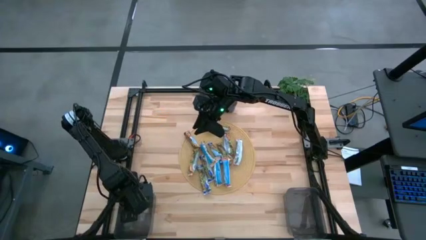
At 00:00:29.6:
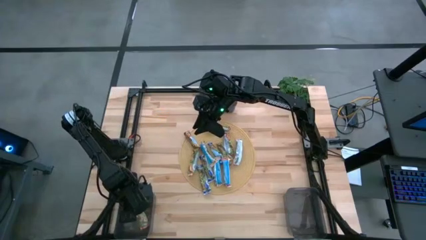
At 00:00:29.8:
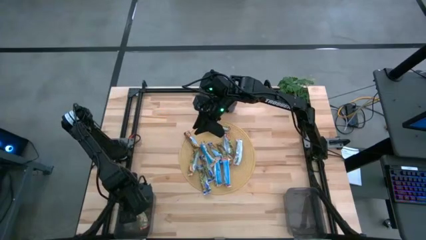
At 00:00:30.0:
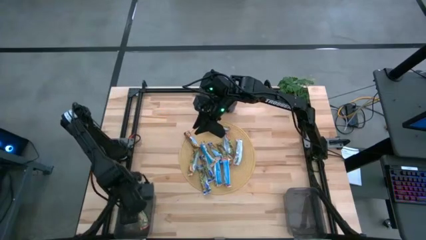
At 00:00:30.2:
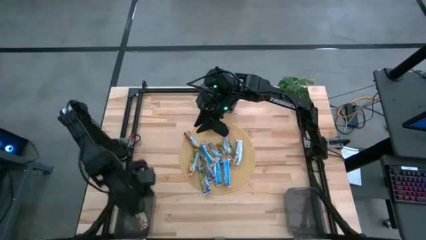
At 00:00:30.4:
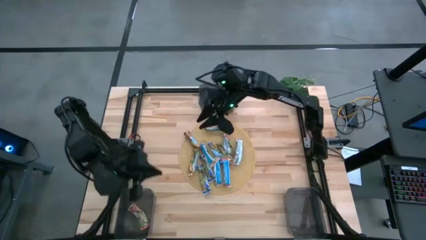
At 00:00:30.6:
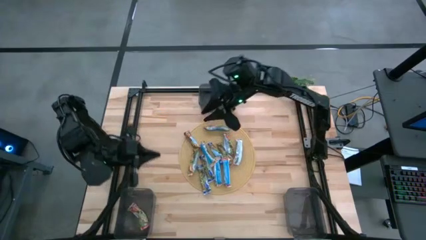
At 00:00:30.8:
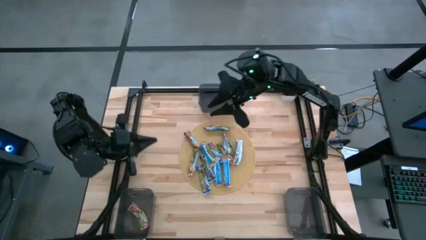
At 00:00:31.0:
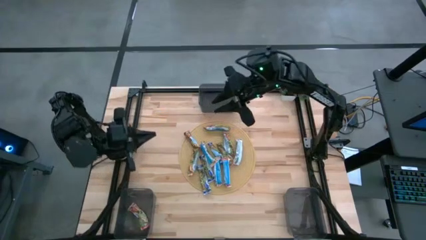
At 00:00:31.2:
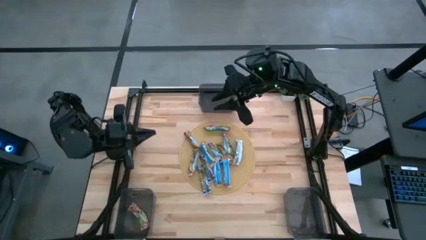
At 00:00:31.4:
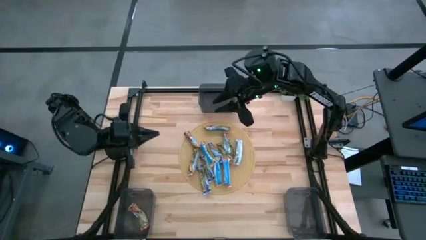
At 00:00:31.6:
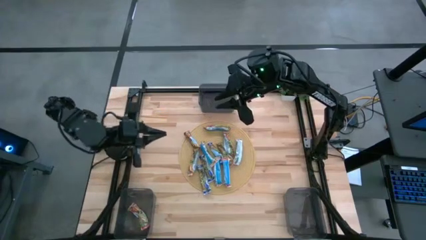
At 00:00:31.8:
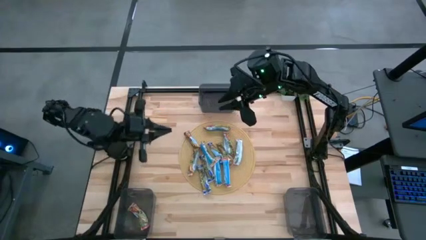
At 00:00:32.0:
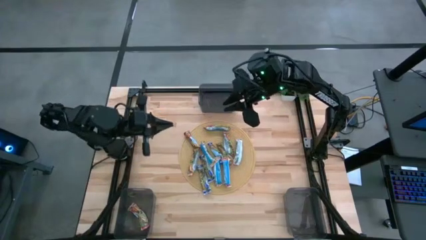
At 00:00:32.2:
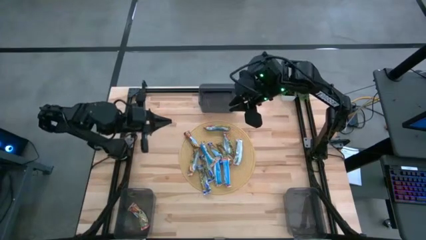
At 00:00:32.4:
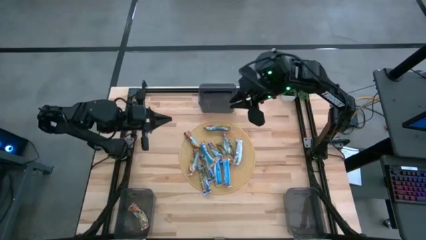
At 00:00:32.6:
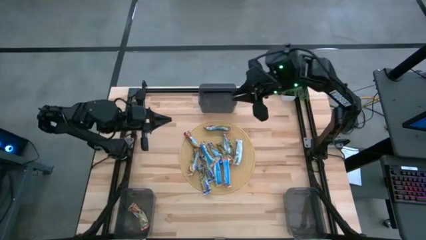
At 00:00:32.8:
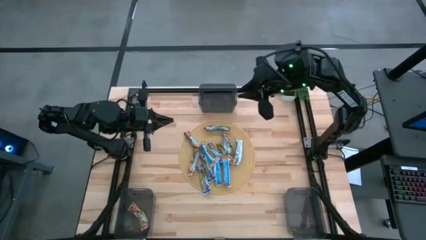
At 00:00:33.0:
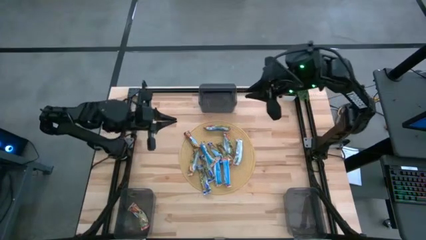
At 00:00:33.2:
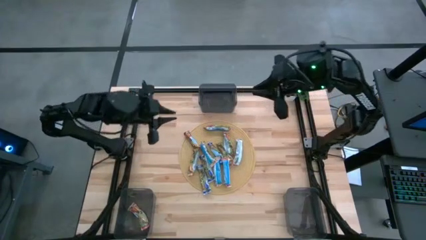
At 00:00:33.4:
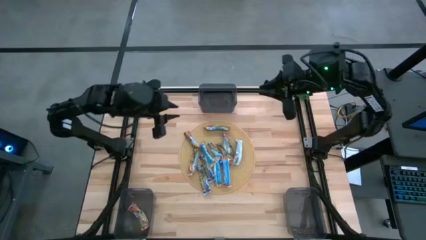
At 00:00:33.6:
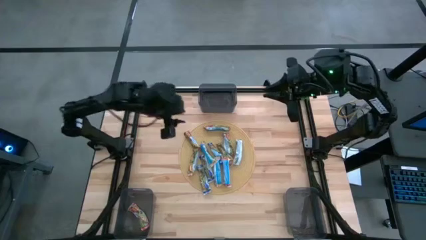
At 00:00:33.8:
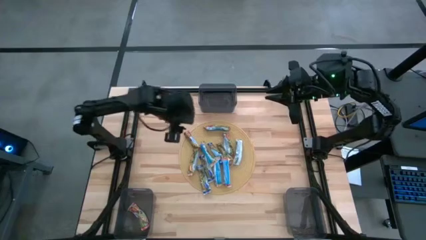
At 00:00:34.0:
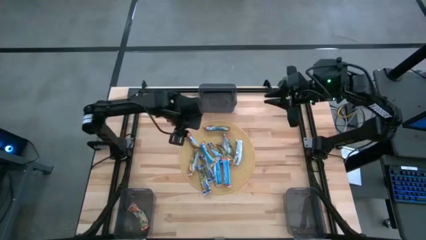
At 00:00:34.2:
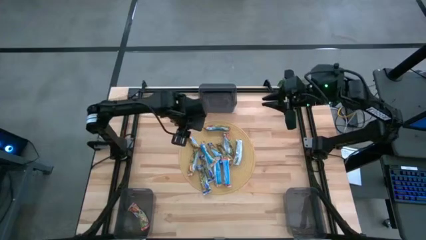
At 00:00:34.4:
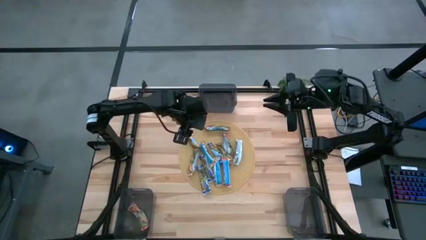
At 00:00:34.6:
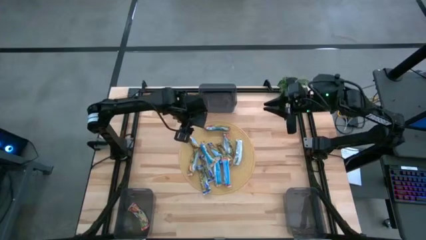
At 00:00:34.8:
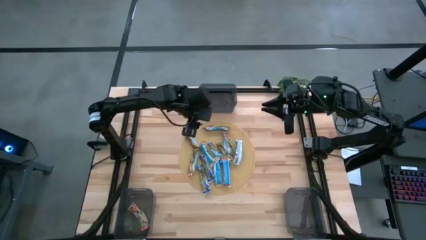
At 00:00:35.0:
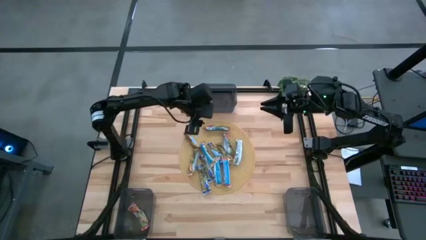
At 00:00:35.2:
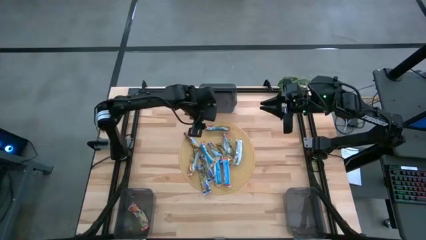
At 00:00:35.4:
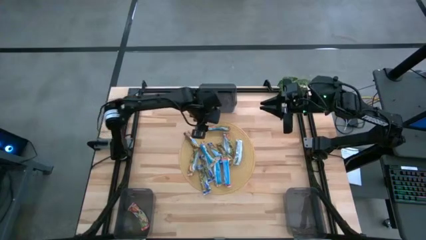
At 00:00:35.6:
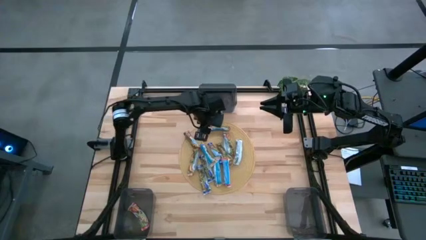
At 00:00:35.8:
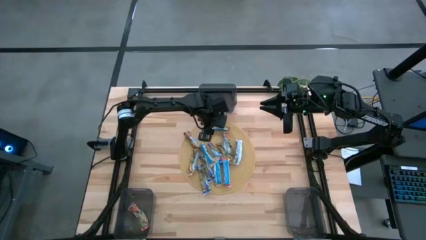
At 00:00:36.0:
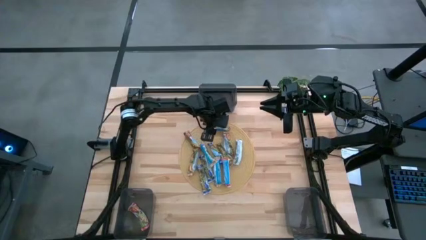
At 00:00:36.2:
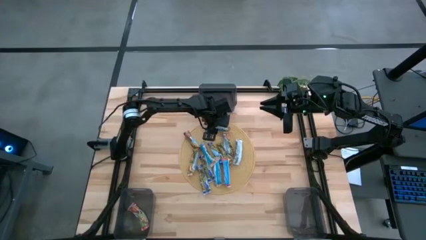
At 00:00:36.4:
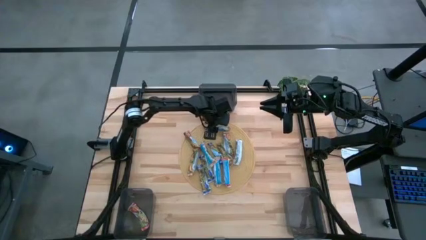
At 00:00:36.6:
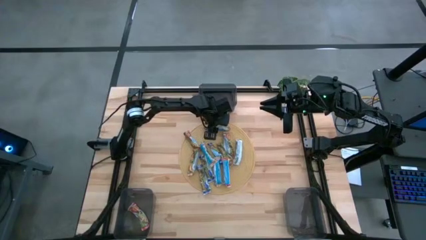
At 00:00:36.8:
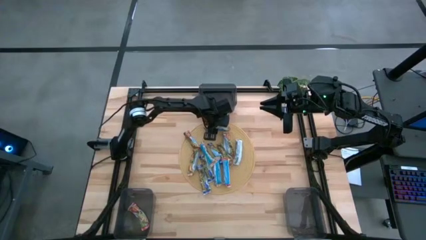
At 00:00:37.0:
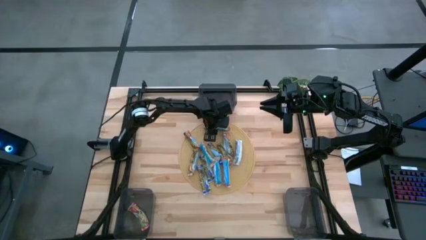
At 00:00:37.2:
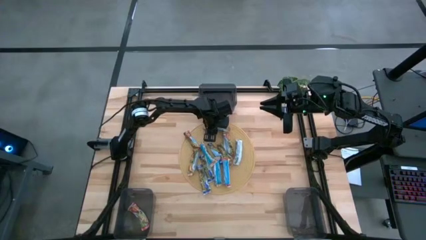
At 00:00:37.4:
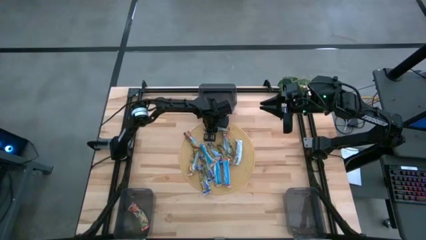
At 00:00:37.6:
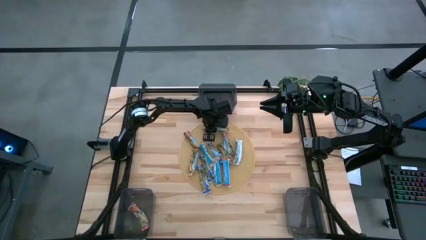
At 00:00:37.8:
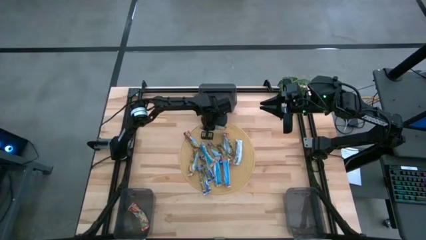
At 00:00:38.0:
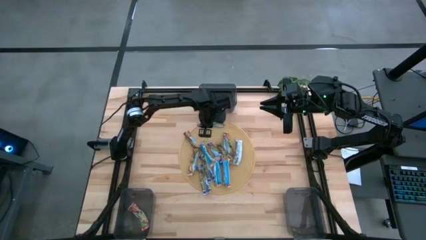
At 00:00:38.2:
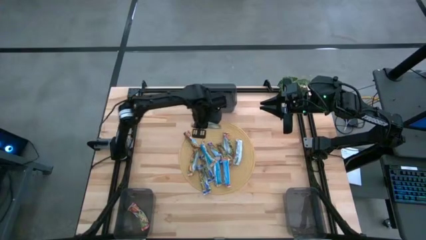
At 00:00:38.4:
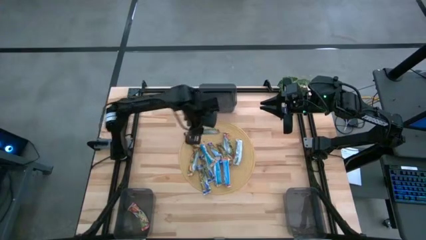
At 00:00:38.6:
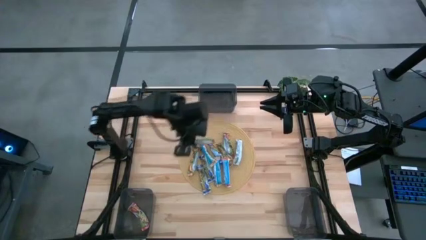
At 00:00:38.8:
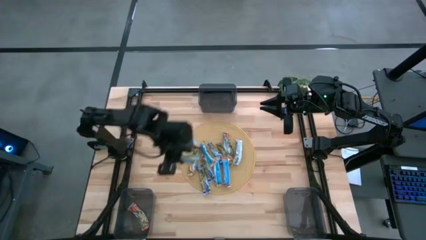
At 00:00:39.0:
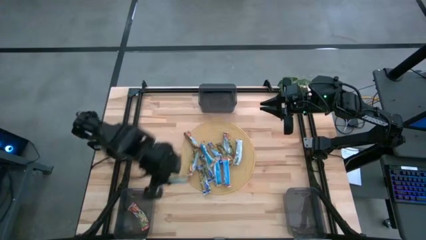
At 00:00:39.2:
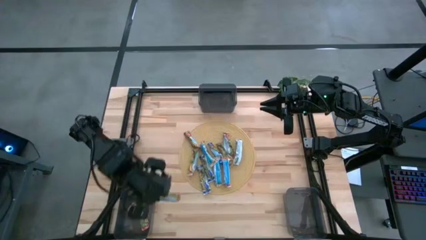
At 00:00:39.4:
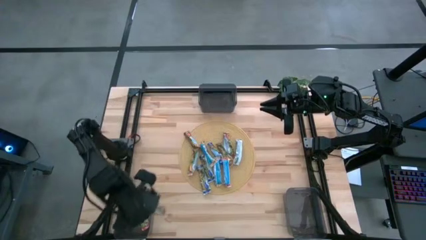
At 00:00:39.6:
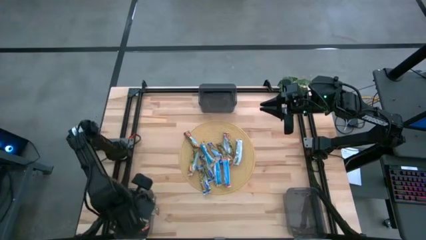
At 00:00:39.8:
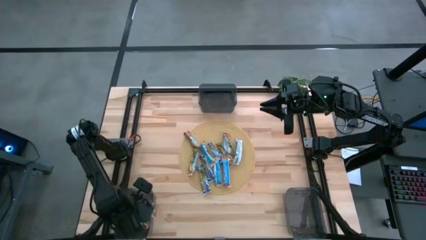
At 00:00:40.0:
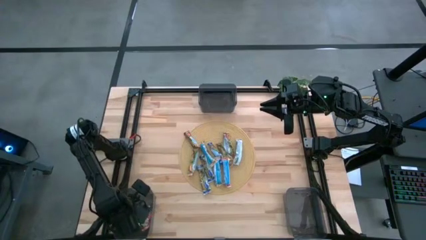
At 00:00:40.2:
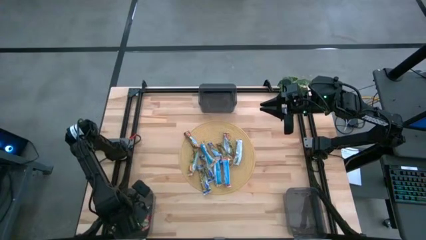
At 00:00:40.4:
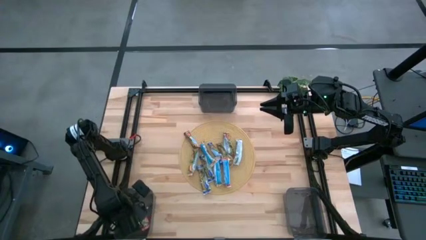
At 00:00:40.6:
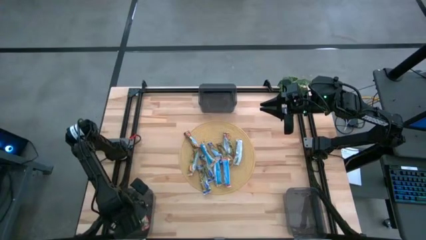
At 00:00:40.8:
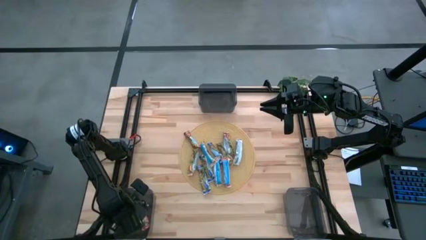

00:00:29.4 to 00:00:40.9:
Task: Pick and place Granola Bars by type
Put the red granola bar into the left black bin

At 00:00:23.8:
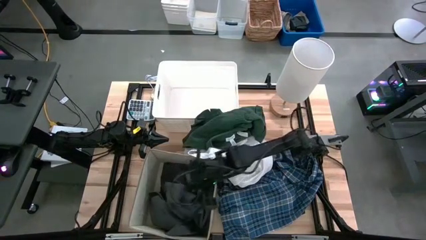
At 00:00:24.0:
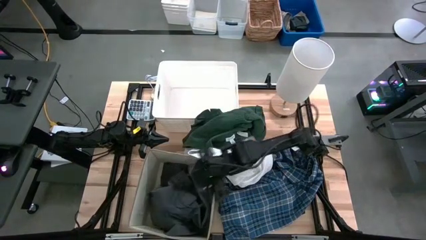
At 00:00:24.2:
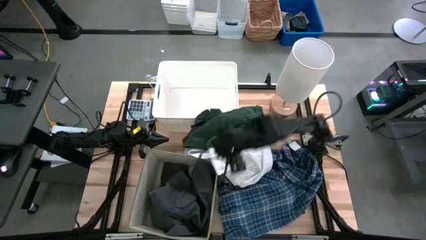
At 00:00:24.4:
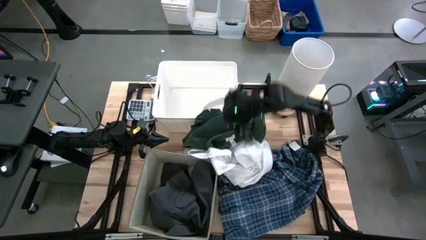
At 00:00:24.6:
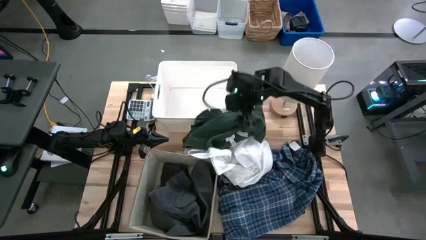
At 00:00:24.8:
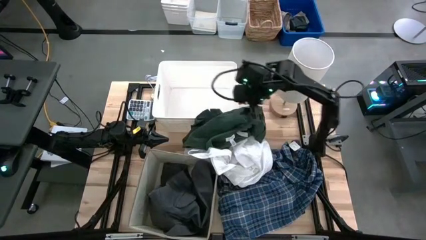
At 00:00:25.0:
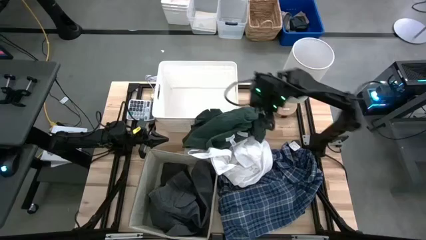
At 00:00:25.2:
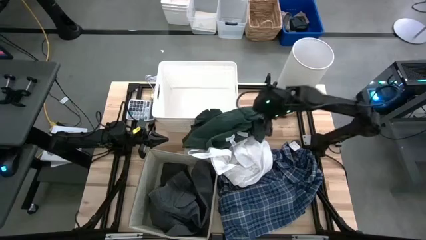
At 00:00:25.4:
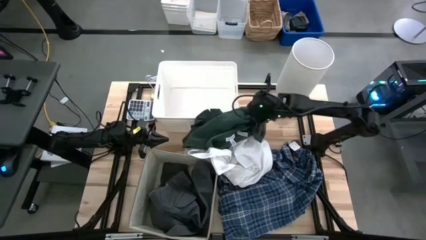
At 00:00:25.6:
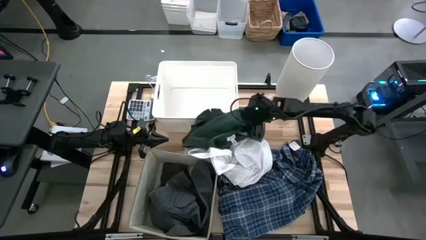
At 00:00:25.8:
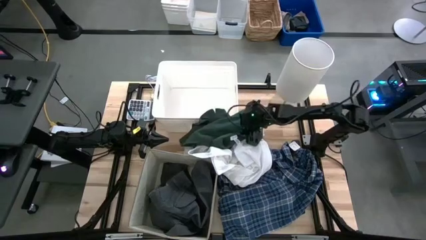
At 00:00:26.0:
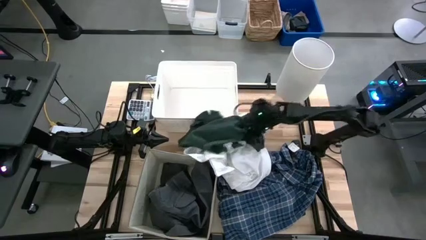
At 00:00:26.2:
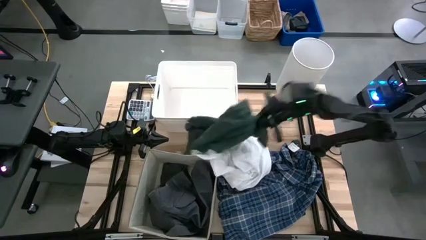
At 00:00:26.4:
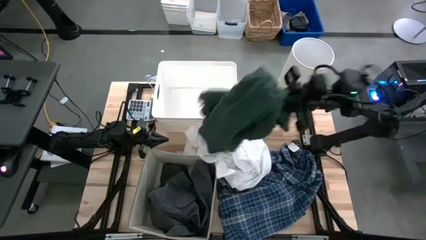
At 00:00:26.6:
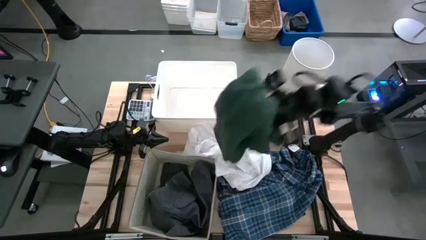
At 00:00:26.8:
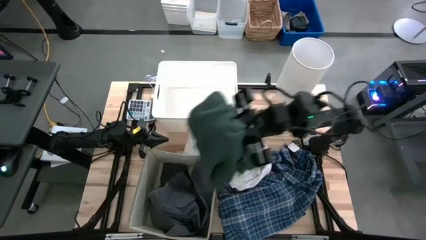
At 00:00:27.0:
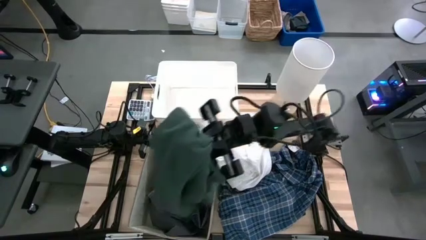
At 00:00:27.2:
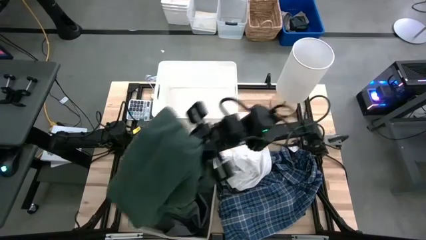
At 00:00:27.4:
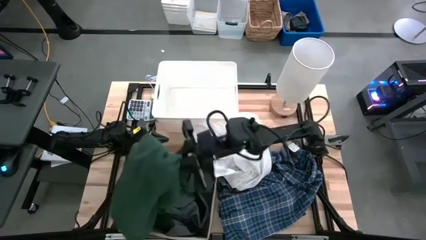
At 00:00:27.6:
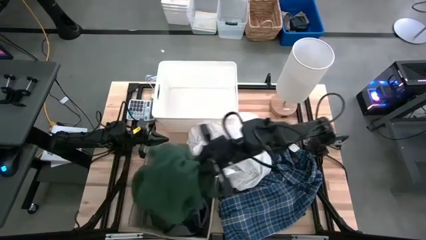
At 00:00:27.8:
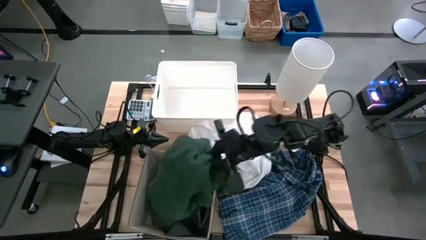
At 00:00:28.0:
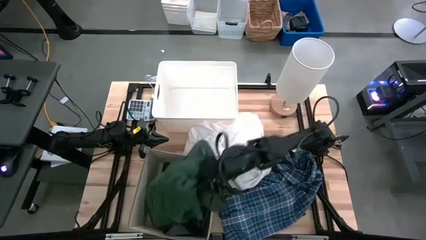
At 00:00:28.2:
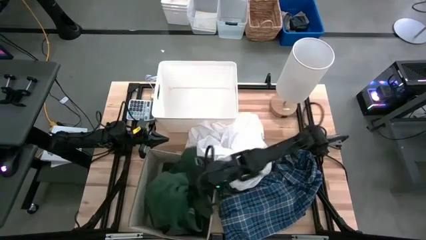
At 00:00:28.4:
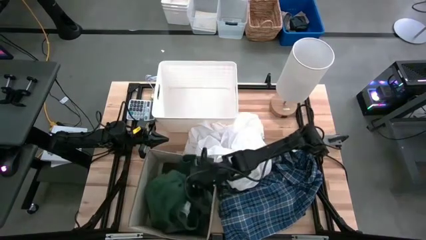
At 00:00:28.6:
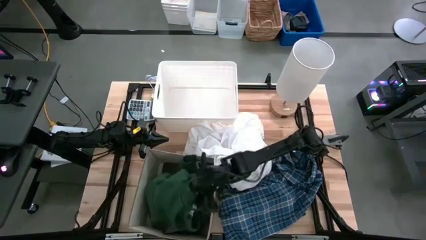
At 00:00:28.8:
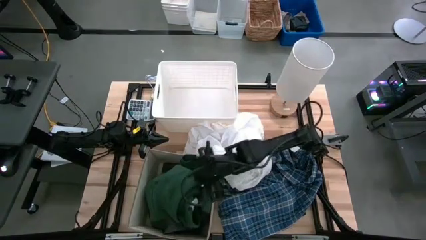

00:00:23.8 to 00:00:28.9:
Task: Sort clothes
Put the green sweater into the laundry organizer
